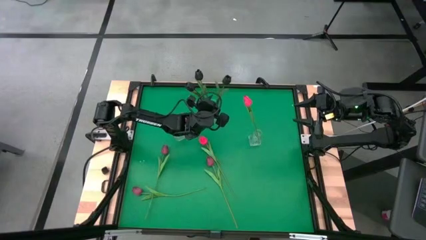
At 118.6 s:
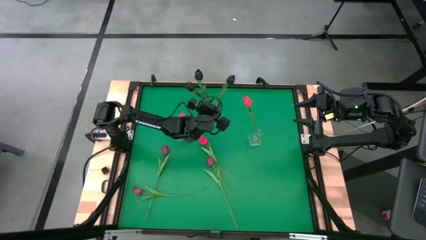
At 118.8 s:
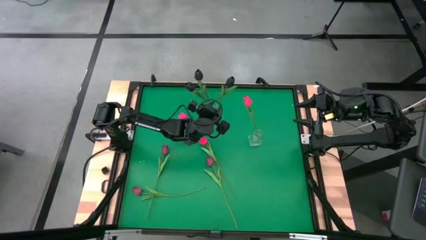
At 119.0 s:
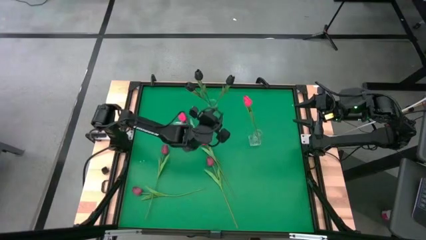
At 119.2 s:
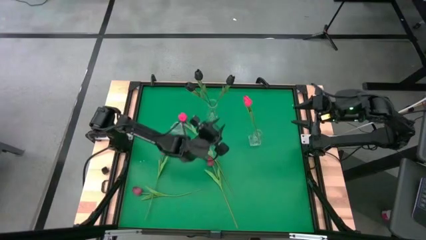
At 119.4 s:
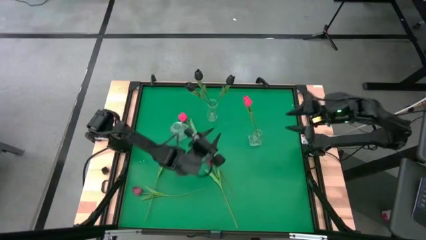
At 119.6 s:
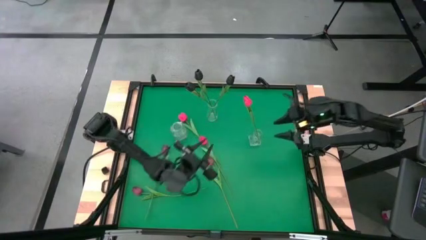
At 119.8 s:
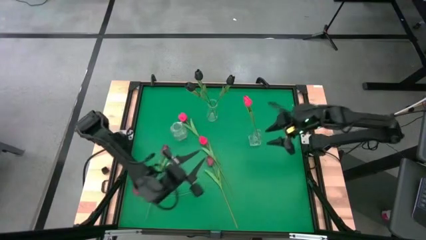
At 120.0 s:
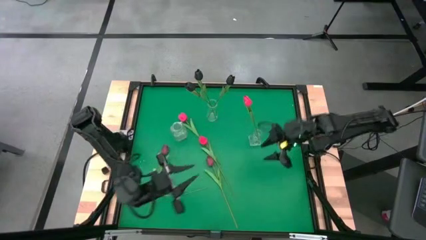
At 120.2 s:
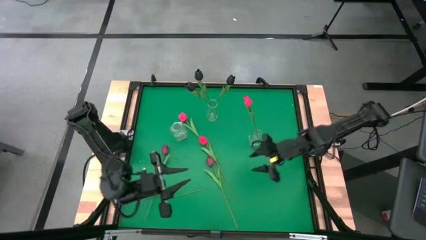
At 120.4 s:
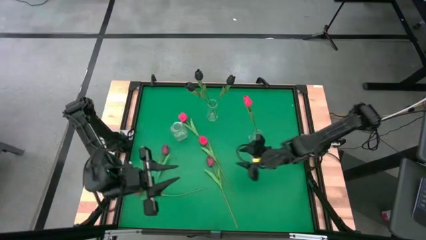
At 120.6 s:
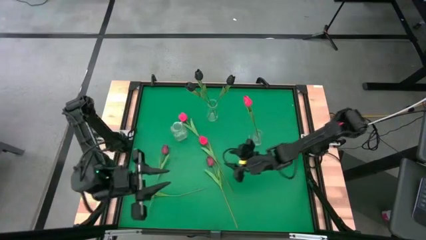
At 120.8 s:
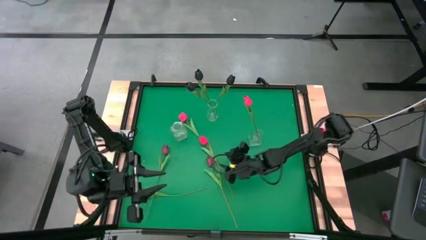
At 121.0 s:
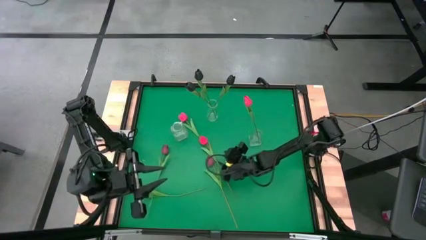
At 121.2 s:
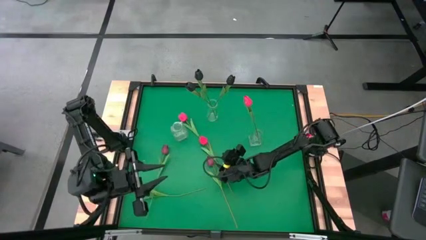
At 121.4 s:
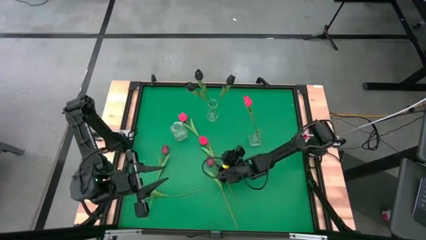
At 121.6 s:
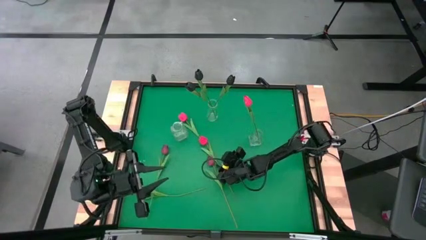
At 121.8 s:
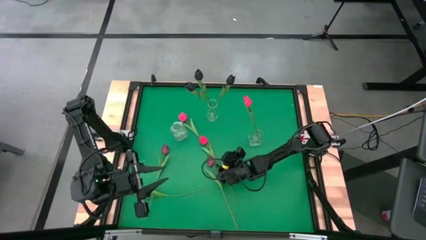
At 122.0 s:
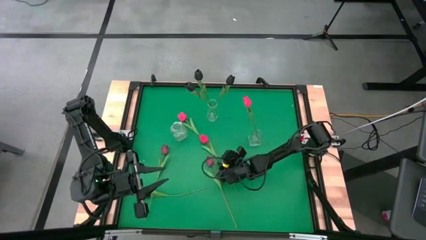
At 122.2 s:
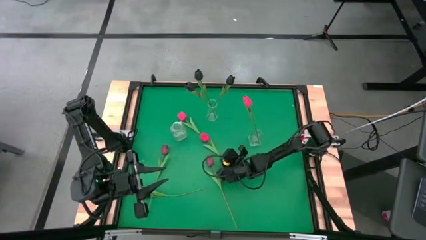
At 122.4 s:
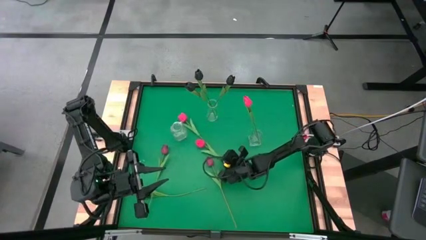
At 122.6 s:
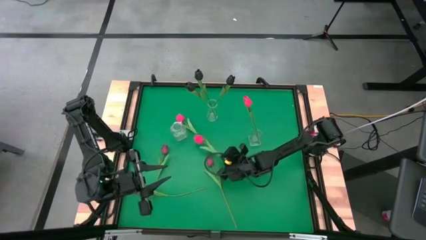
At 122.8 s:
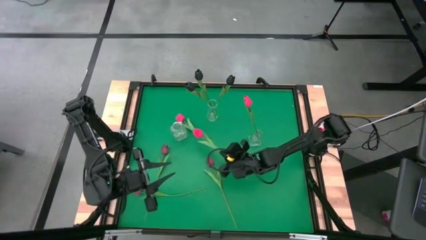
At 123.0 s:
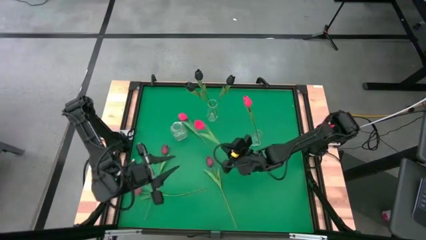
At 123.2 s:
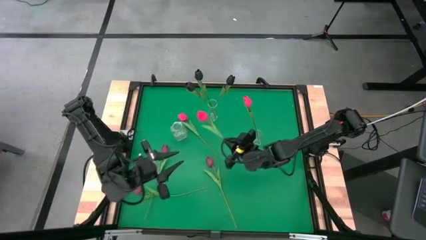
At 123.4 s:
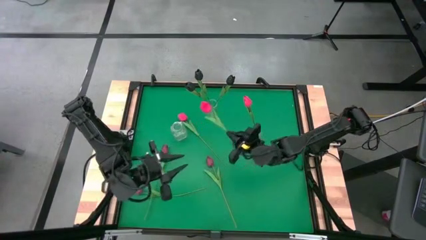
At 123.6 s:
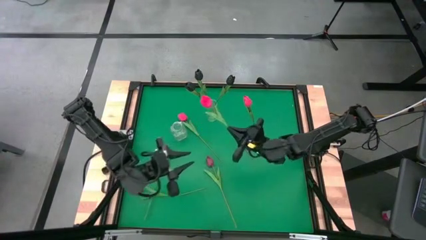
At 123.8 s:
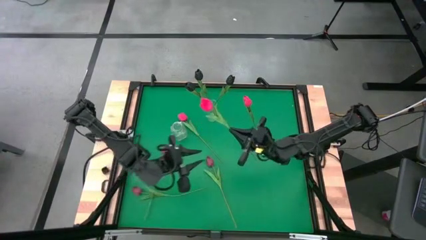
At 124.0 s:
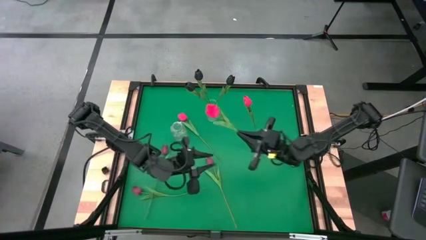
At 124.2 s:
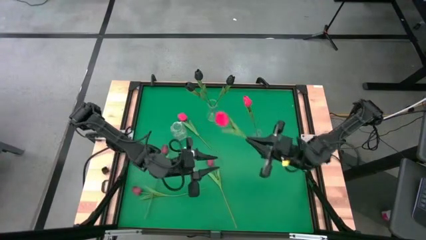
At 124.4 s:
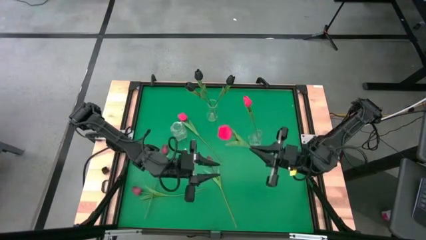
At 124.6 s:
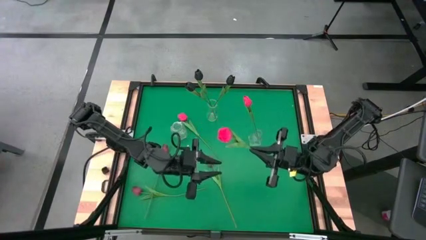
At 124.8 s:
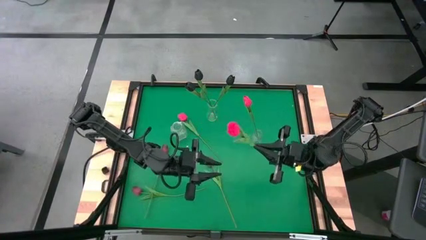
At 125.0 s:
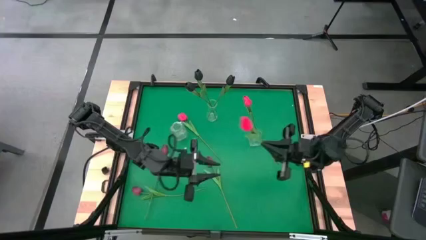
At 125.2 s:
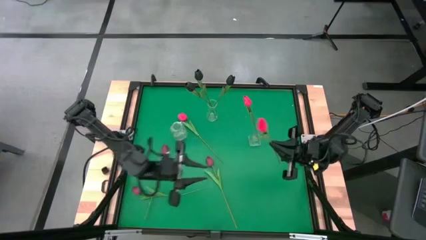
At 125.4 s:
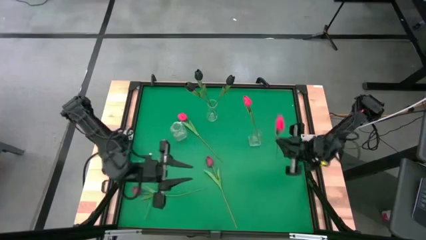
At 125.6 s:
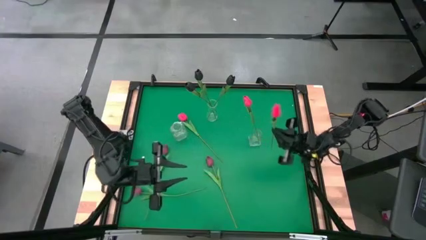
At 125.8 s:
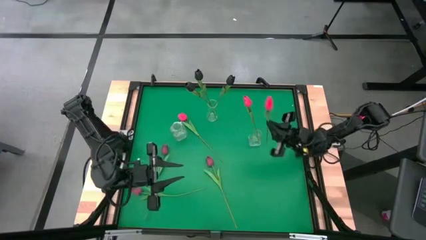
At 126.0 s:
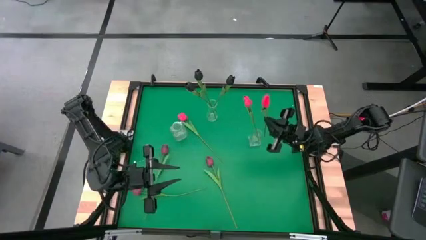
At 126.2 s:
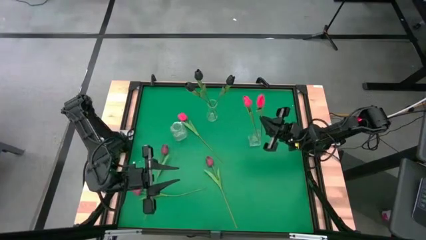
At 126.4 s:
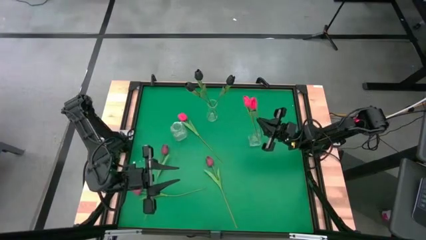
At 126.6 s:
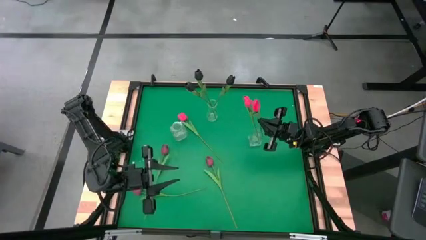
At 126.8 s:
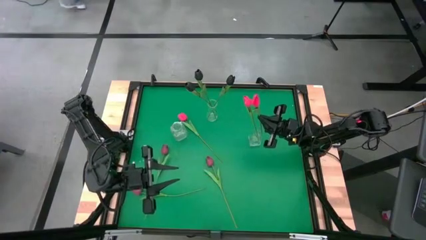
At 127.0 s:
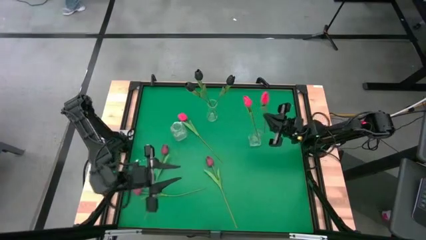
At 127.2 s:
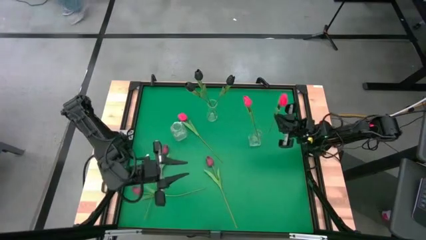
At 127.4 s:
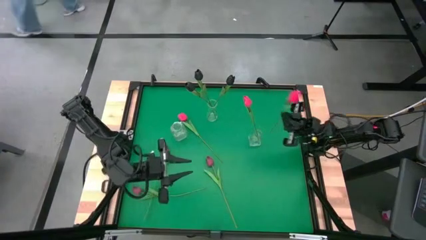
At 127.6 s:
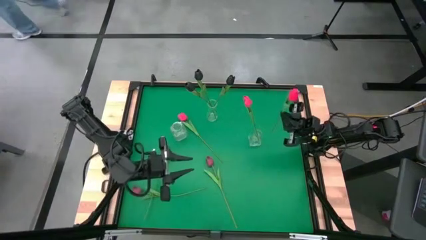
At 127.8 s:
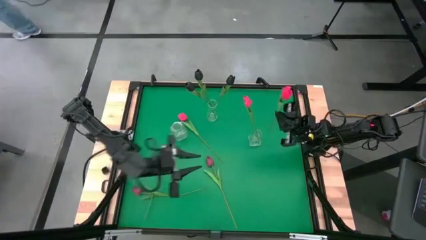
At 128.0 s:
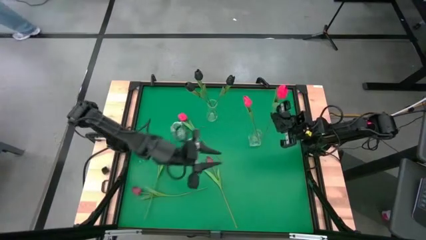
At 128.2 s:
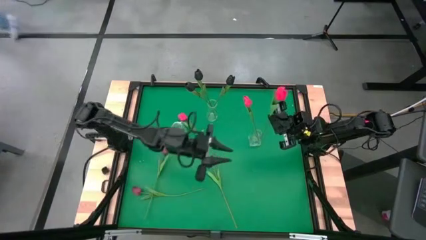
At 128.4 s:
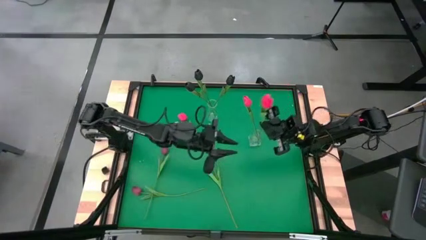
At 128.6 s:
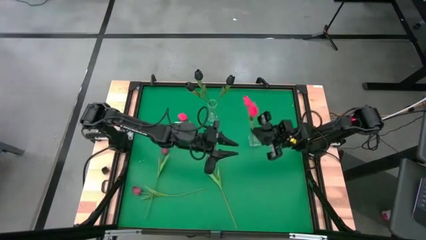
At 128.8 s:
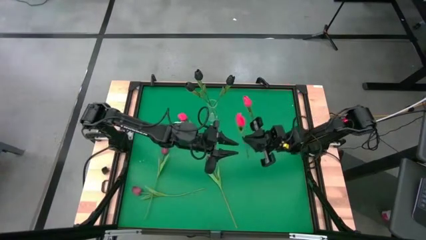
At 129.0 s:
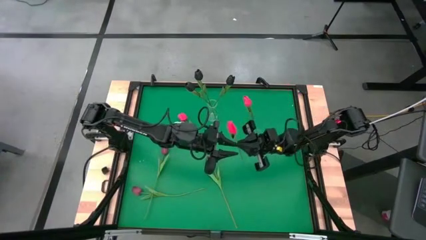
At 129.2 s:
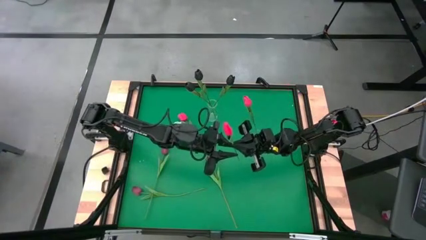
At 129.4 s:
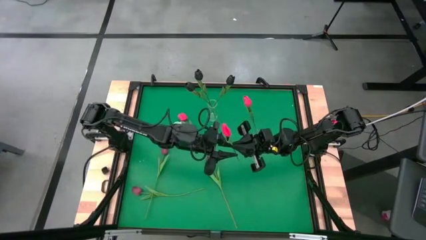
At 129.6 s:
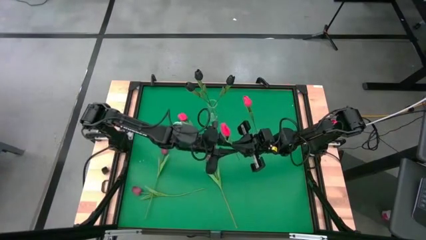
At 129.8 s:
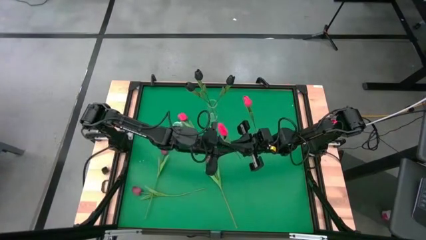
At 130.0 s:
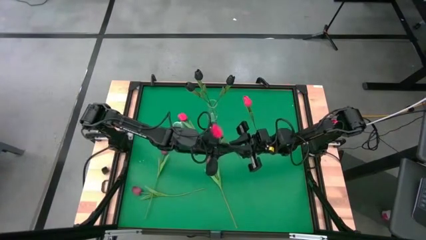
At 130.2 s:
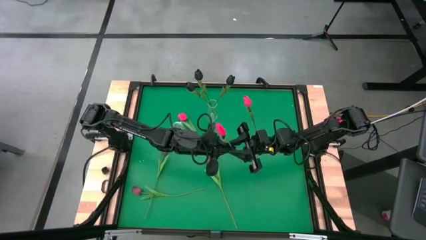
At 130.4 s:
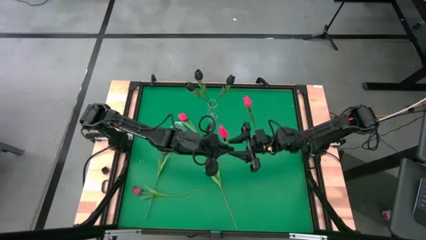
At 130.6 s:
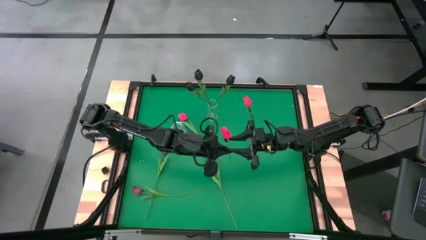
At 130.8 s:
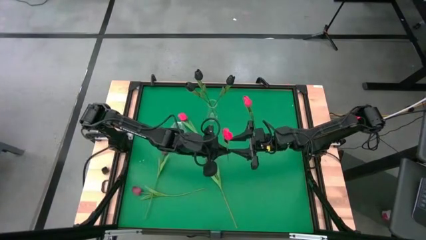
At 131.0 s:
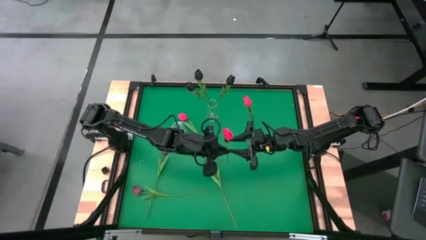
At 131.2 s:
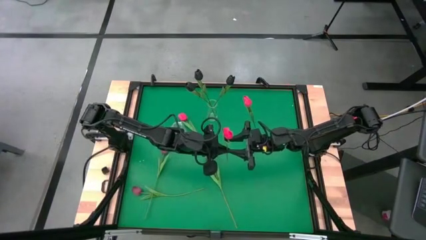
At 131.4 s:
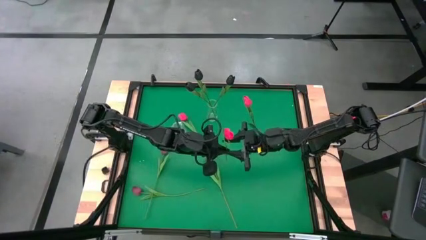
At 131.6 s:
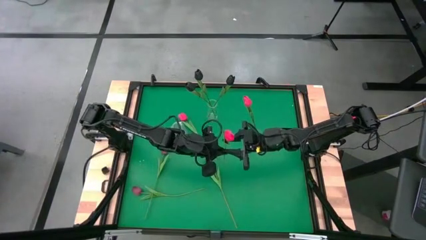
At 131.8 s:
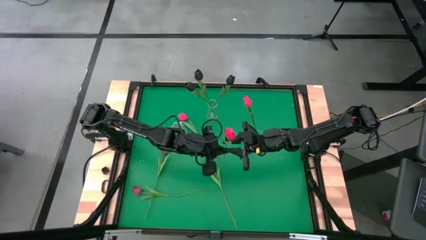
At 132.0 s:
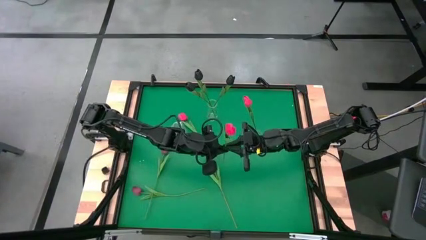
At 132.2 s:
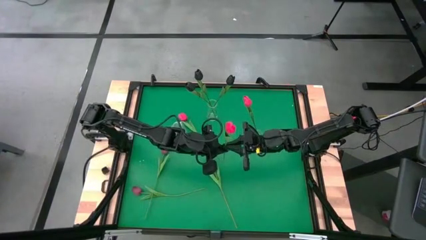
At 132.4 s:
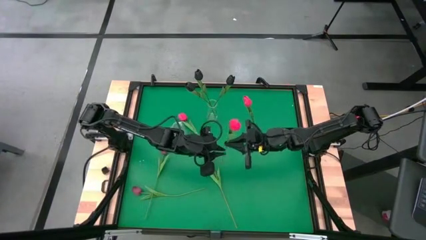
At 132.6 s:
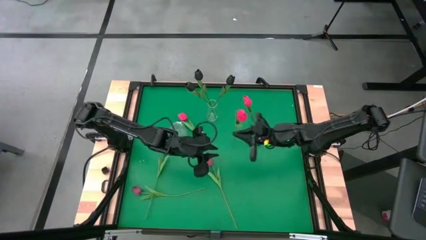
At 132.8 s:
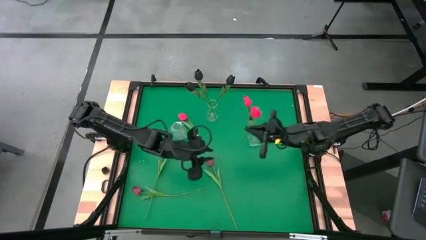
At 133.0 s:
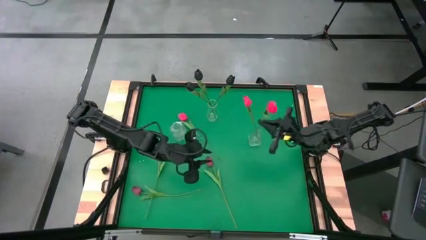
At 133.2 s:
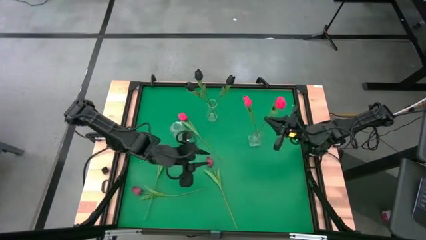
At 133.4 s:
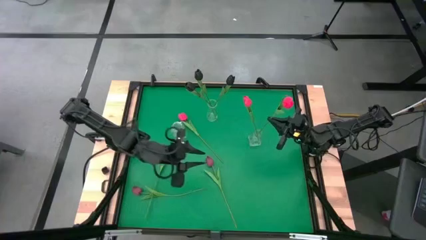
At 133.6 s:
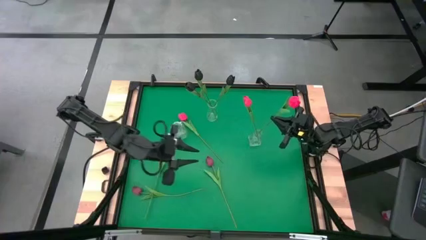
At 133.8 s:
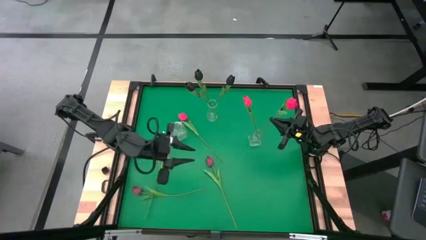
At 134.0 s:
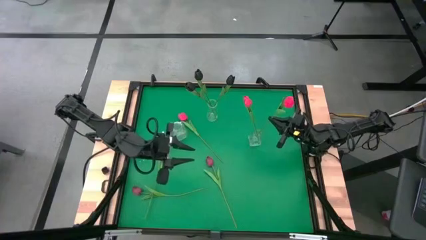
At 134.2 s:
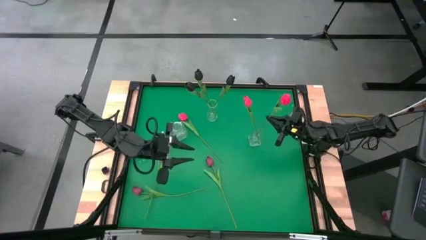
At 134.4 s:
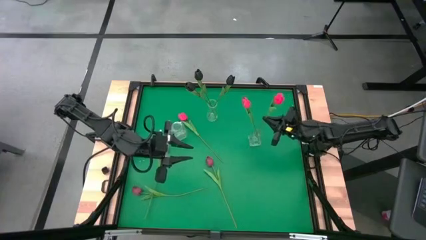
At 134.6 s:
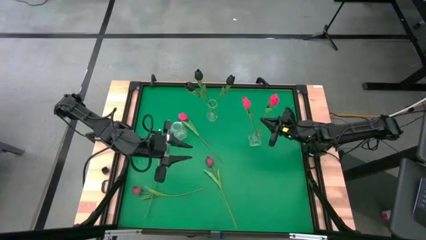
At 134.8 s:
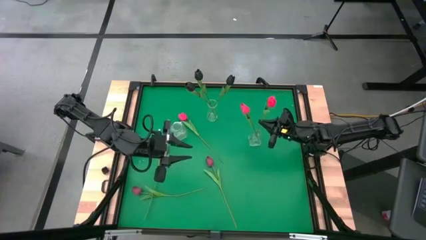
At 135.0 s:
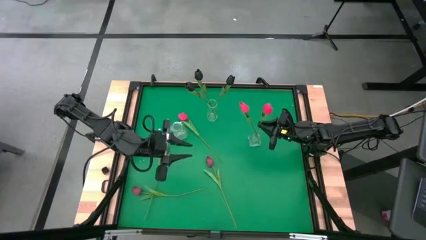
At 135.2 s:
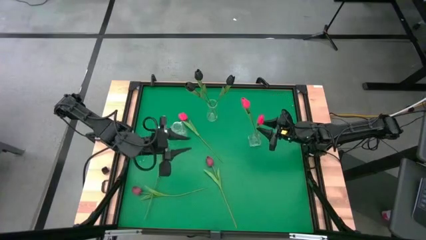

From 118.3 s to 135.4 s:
Task: Sort flowers into vase by color
Put the bottom pink tulip into the bottom right transparent vase
